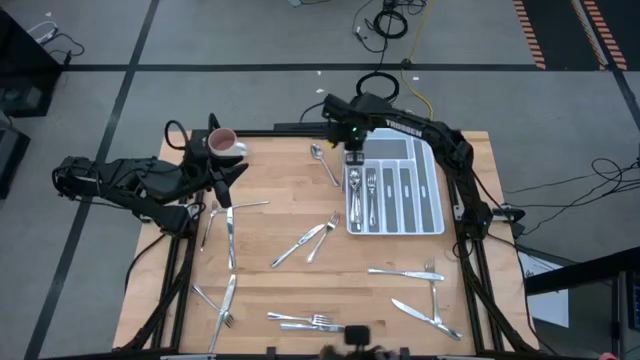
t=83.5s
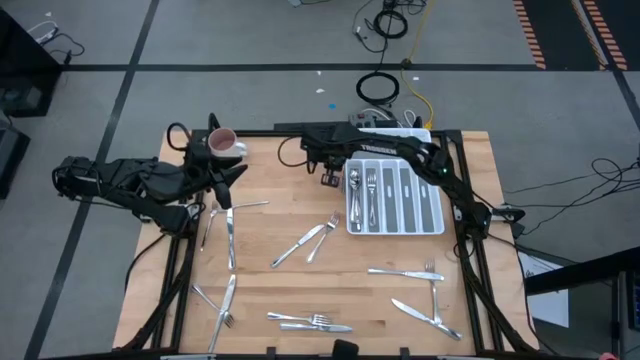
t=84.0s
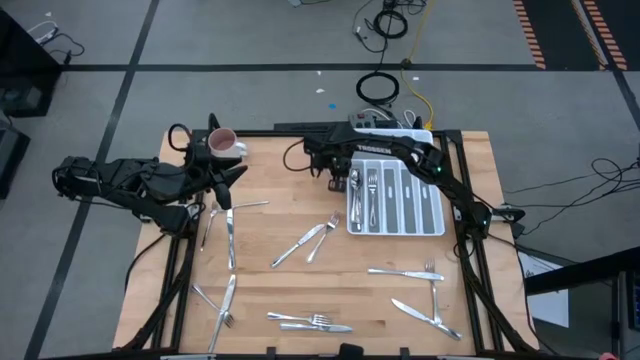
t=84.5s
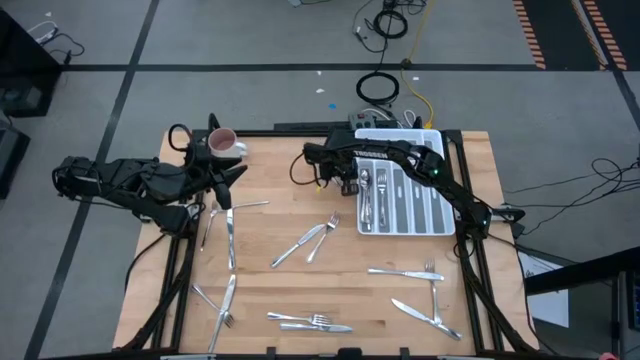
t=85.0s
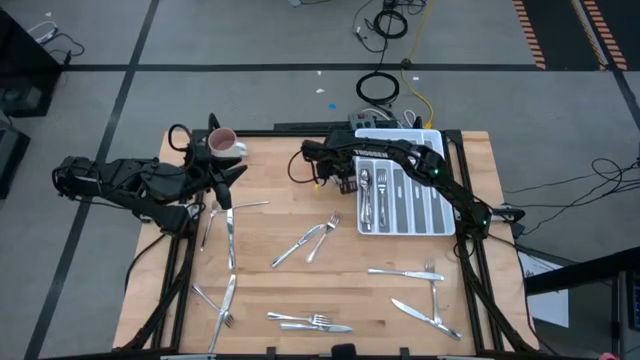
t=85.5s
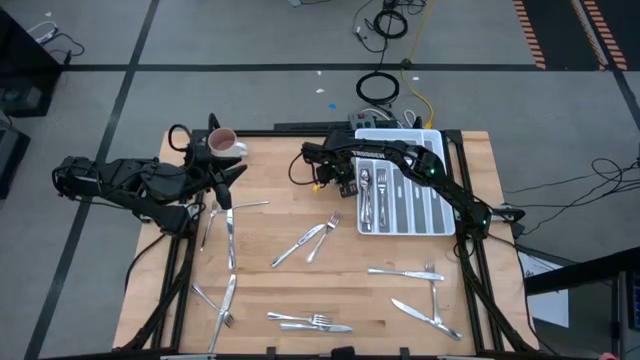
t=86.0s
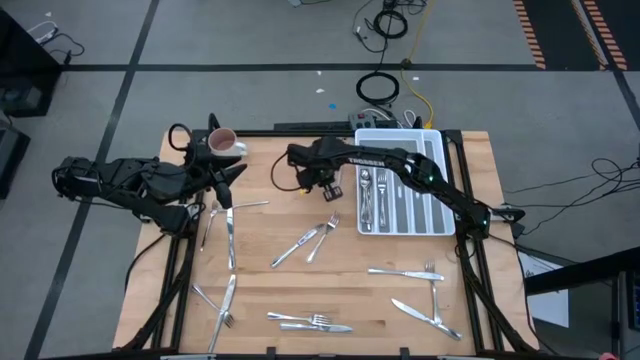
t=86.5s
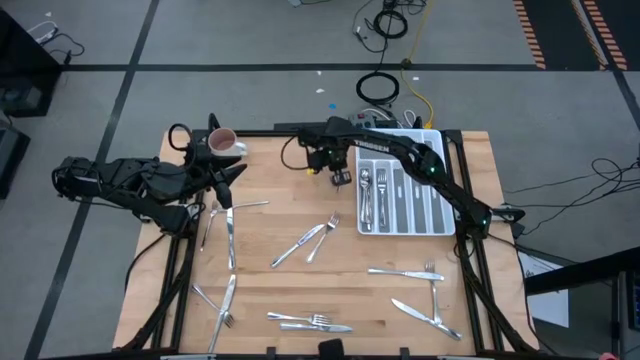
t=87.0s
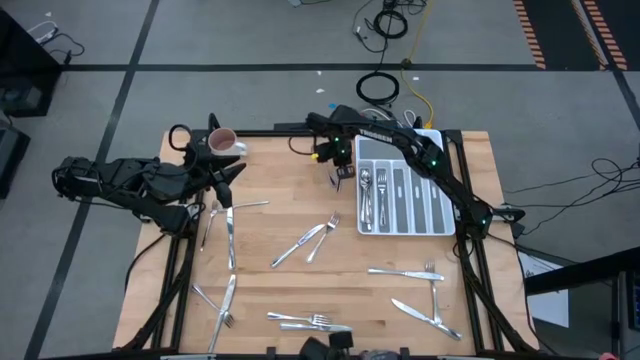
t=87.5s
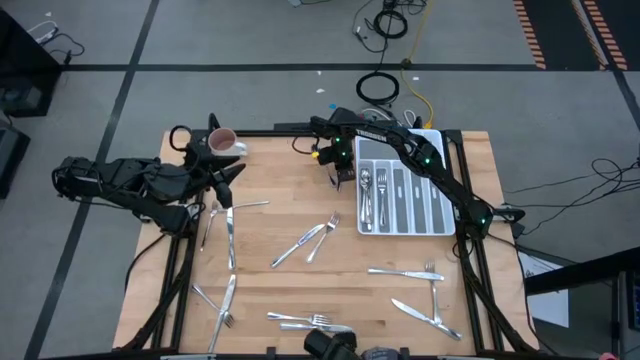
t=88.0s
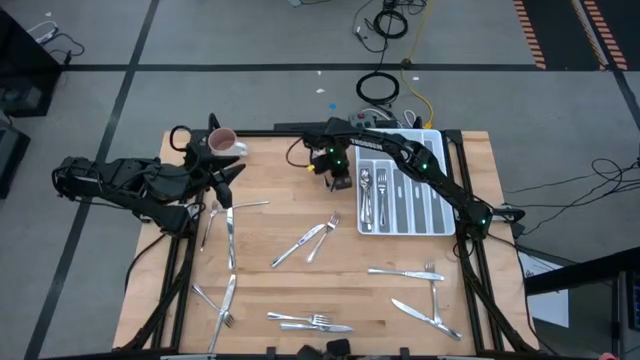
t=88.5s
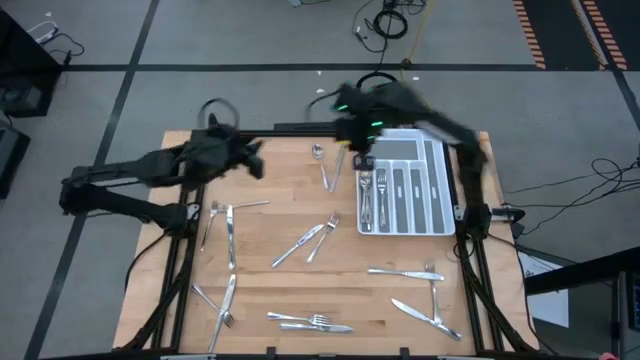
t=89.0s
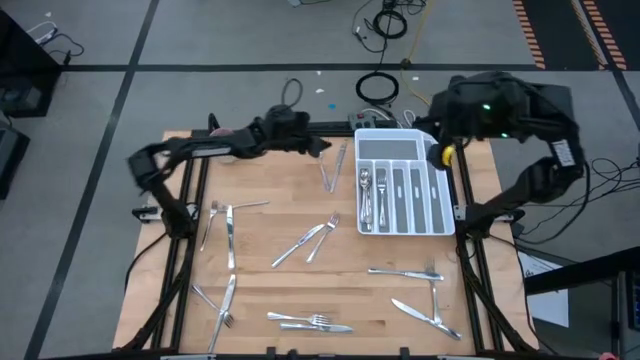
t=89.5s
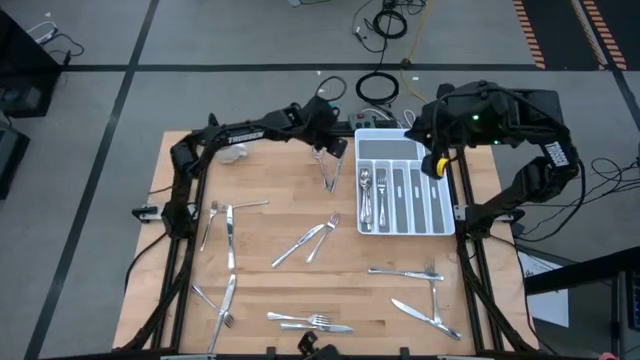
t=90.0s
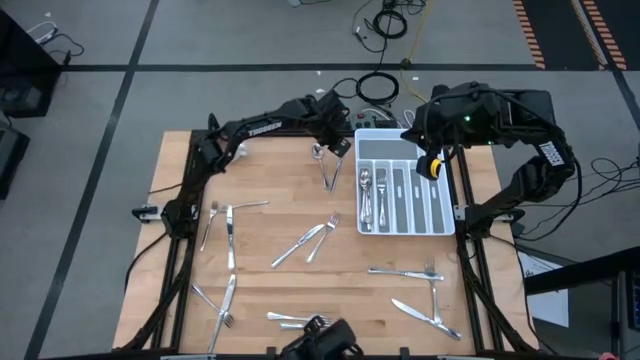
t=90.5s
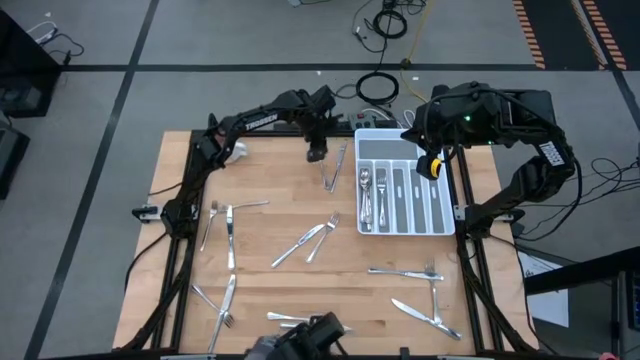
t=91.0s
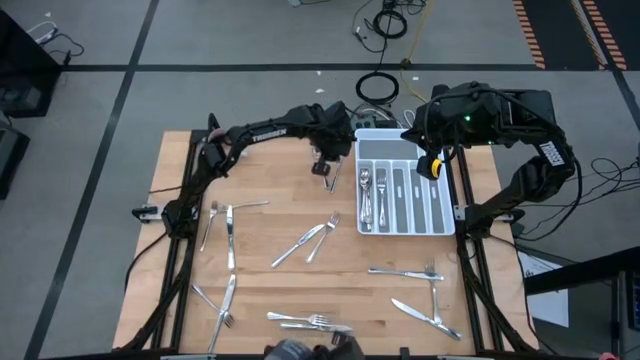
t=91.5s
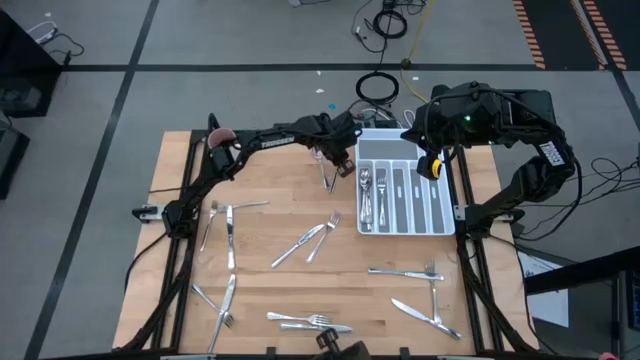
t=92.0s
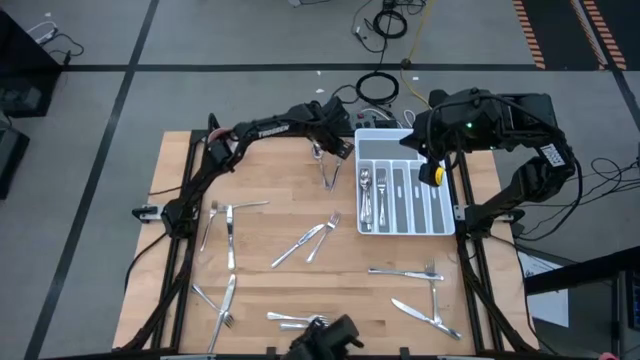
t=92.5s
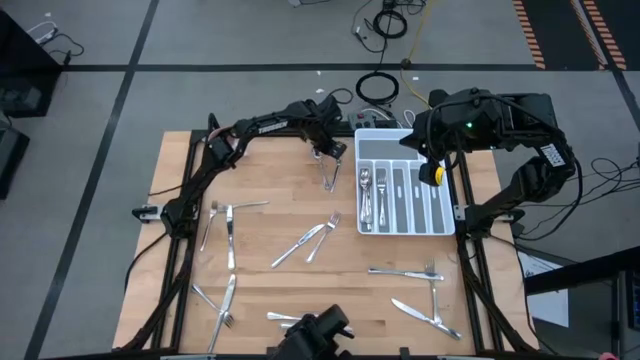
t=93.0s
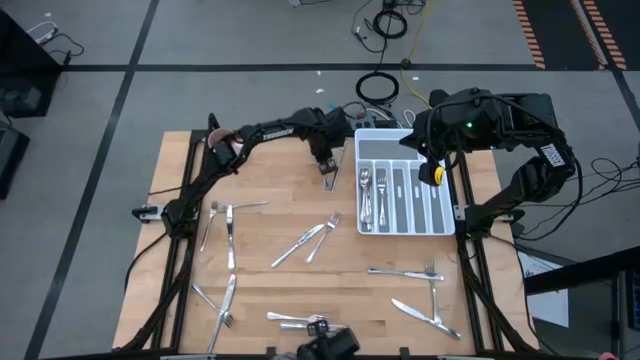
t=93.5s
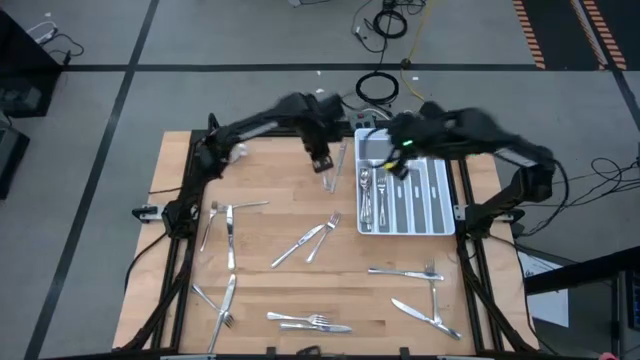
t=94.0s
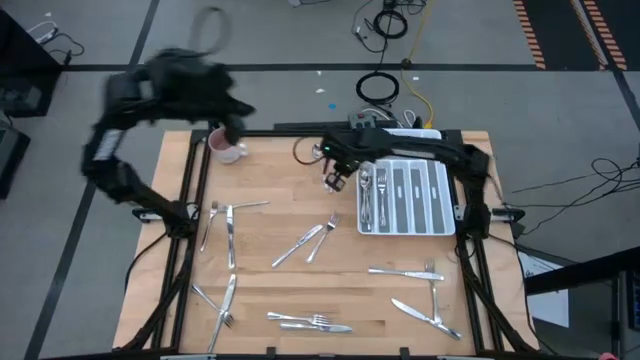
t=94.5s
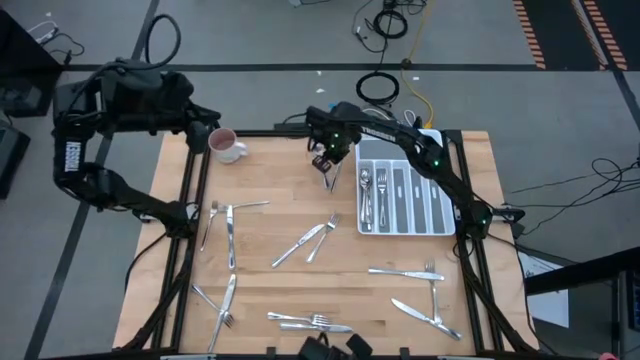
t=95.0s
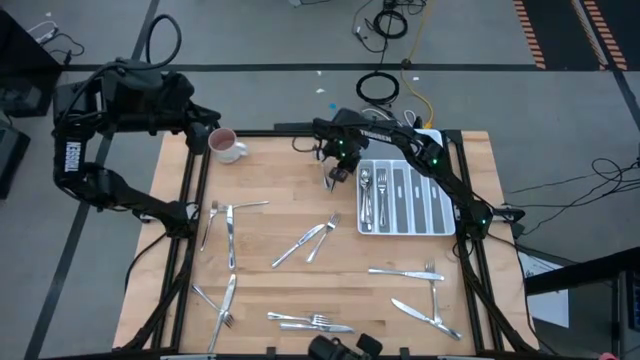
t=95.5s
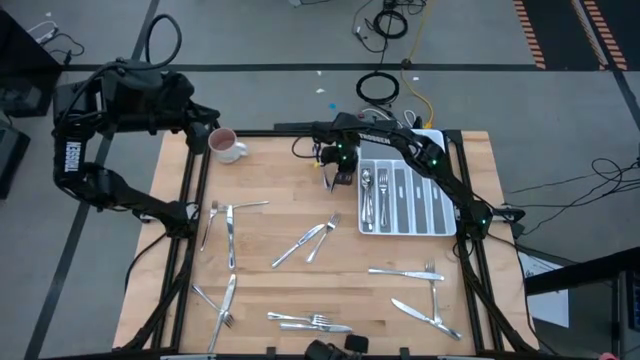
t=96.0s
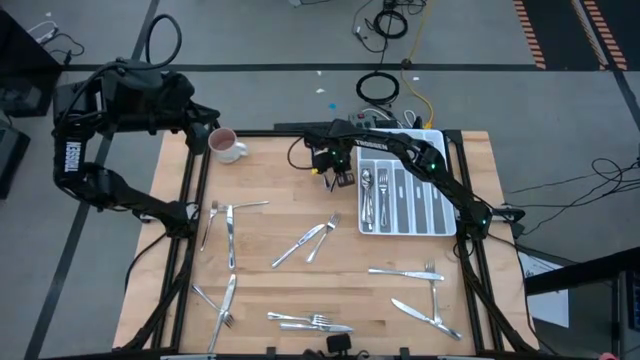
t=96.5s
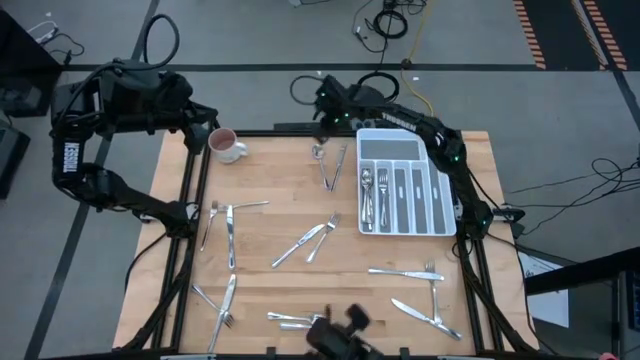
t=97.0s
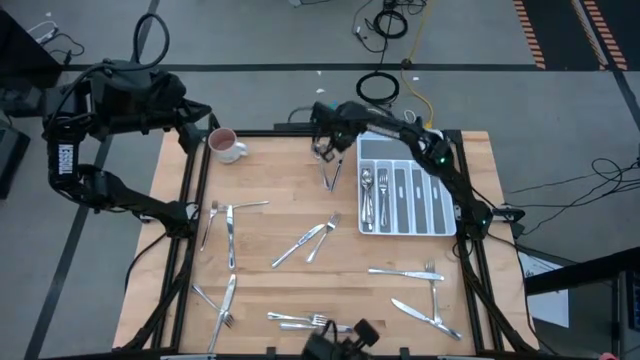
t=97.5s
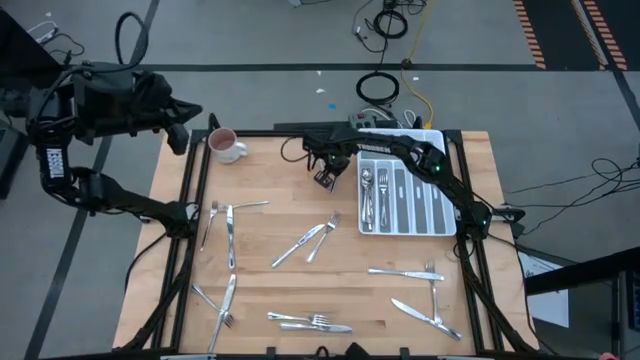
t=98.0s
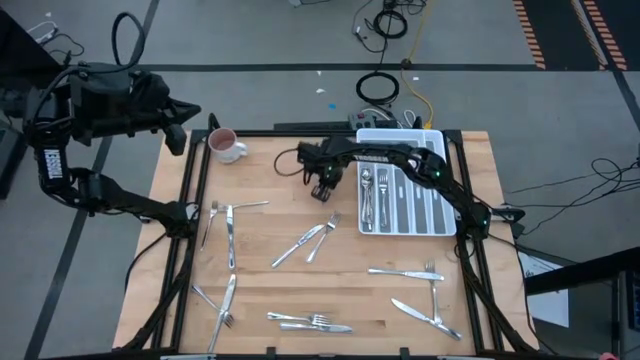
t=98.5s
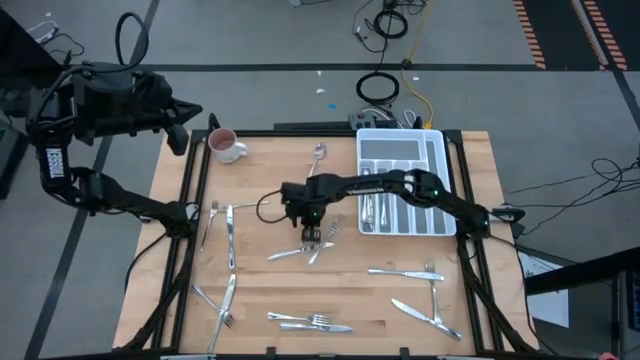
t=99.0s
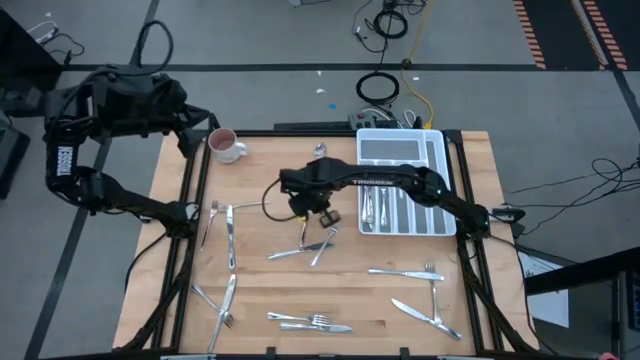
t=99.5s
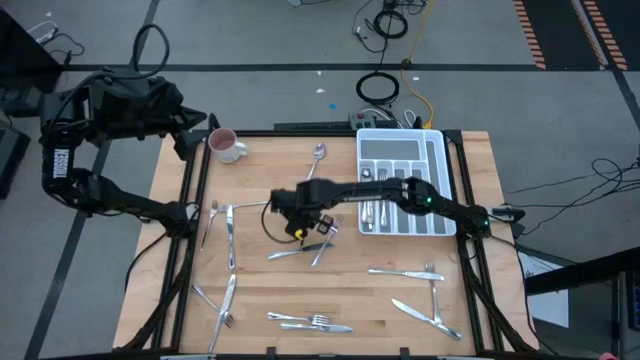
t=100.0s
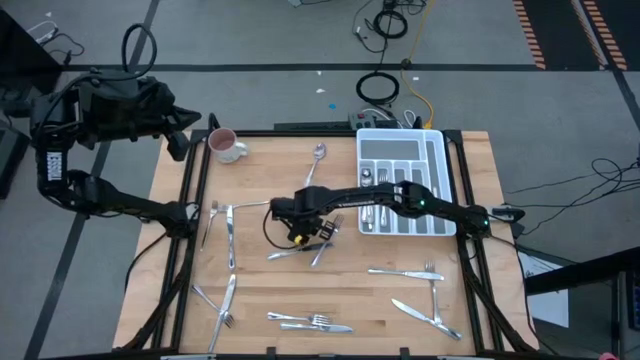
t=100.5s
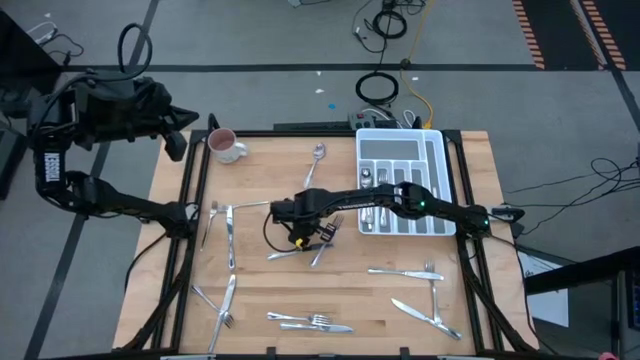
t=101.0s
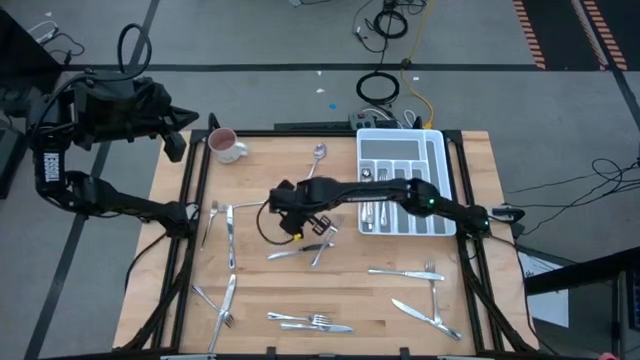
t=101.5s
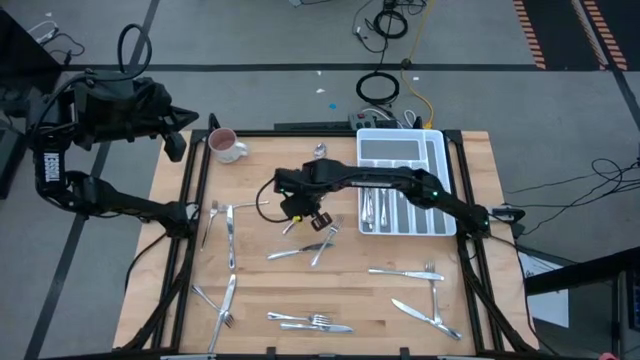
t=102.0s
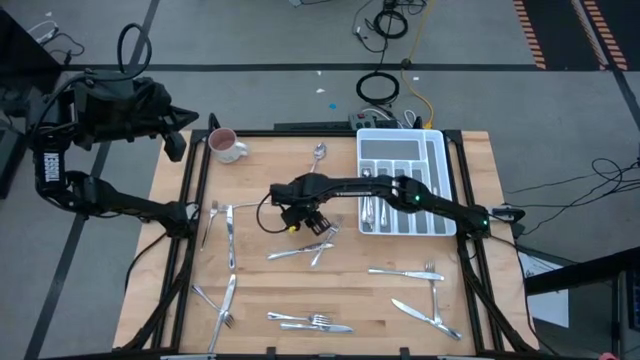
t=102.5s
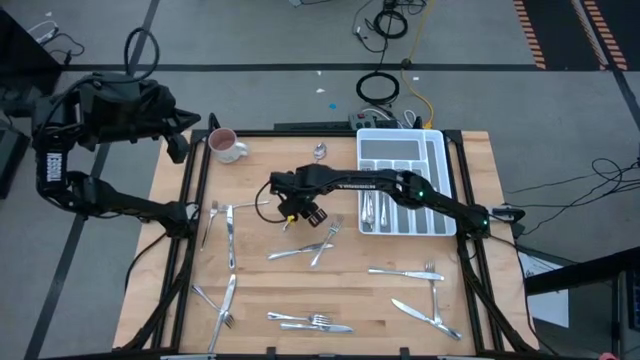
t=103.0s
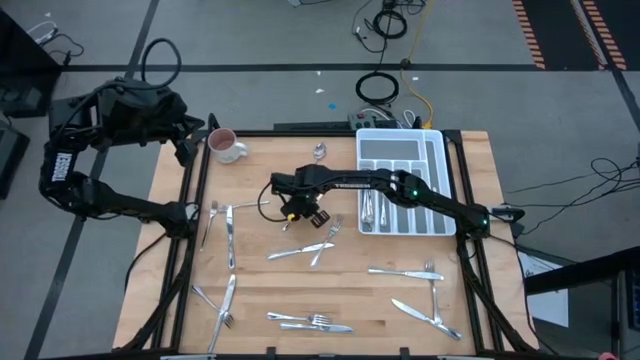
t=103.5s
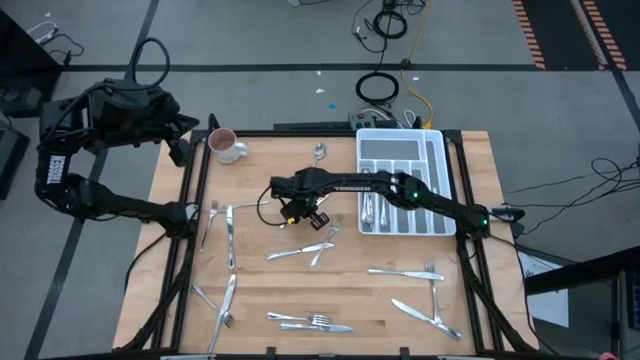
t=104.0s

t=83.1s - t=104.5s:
Task: Sort silverware
Put the silver table knife into the silverware tray

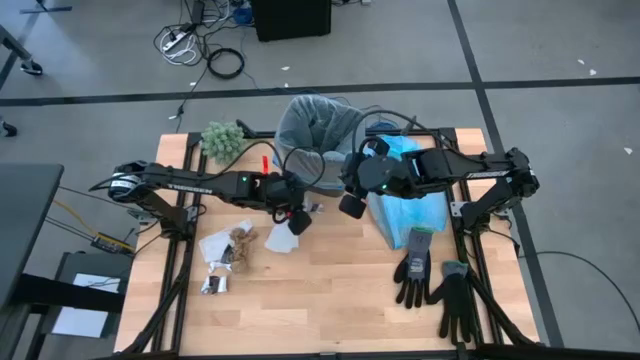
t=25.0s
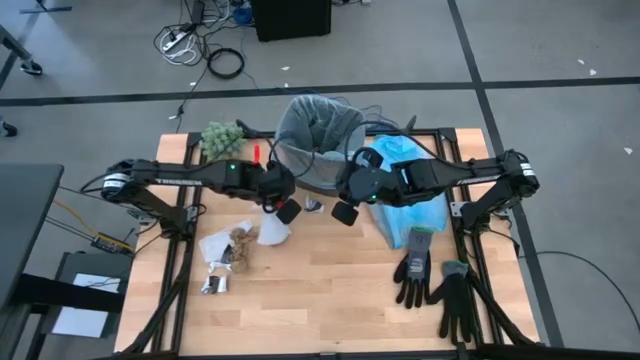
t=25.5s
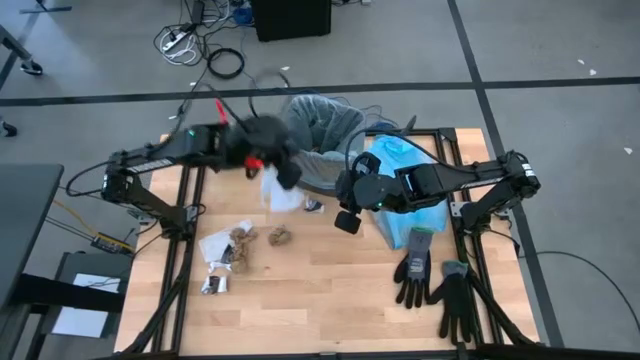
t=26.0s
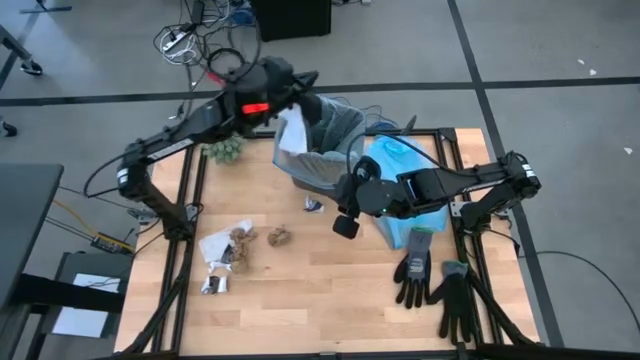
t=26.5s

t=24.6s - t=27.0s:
Task: place trash/remove bag and relplace
Put the white napkin into the trash bin
